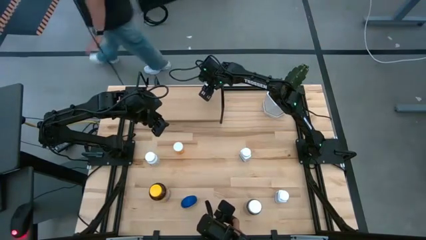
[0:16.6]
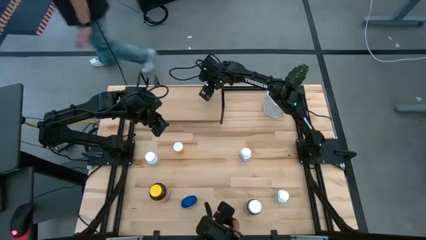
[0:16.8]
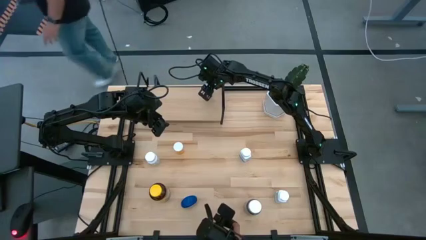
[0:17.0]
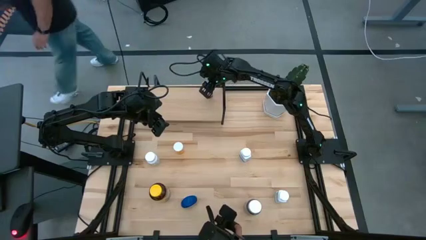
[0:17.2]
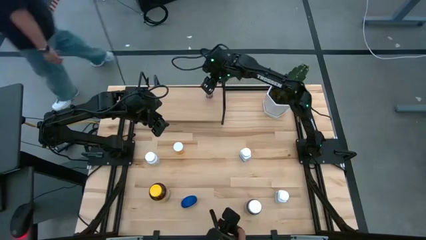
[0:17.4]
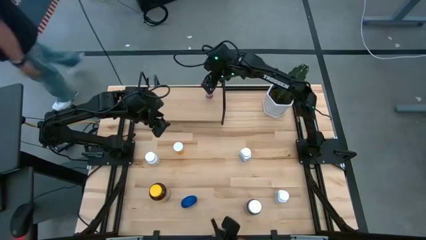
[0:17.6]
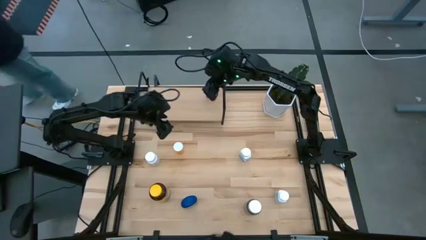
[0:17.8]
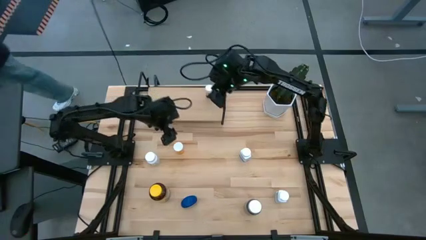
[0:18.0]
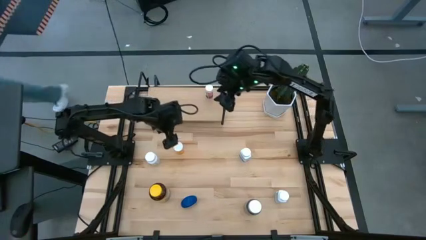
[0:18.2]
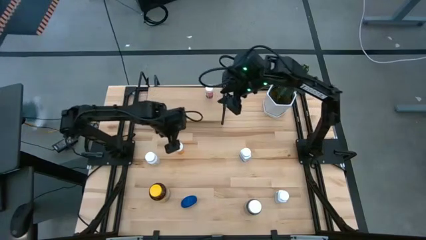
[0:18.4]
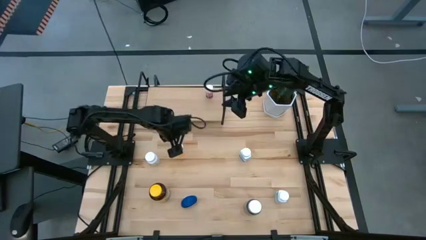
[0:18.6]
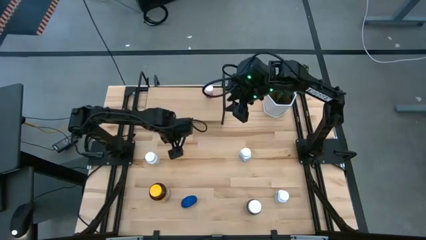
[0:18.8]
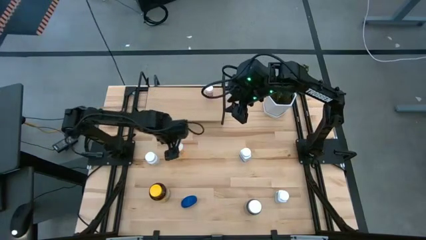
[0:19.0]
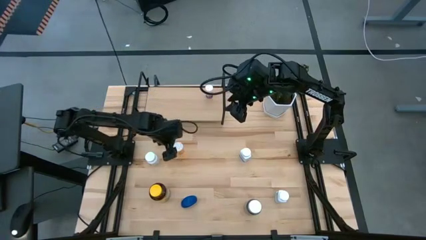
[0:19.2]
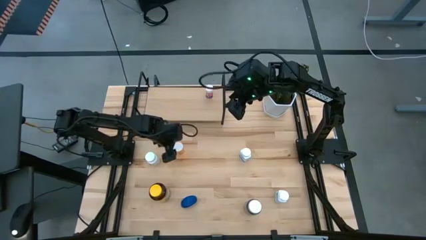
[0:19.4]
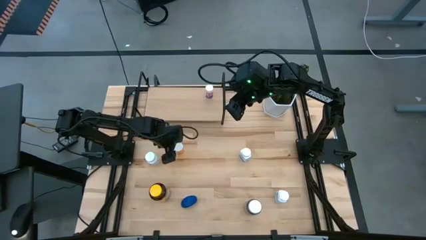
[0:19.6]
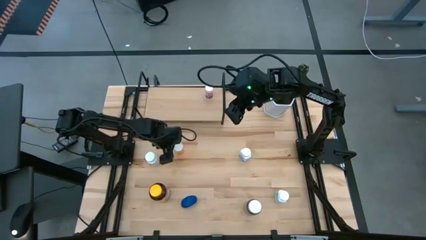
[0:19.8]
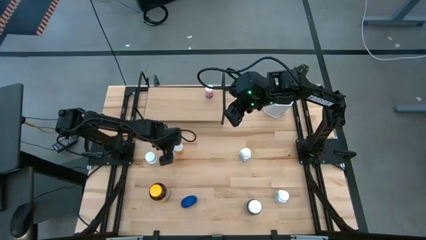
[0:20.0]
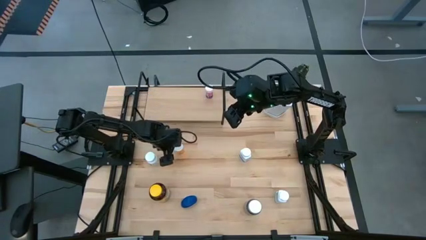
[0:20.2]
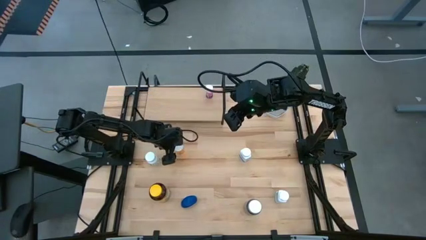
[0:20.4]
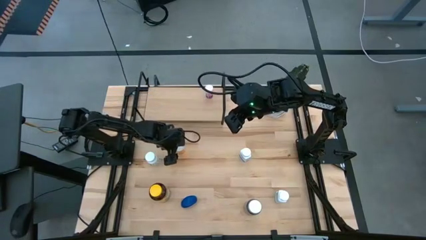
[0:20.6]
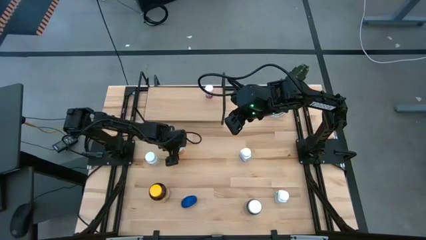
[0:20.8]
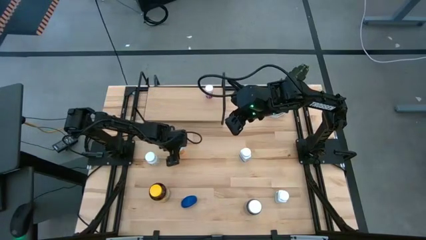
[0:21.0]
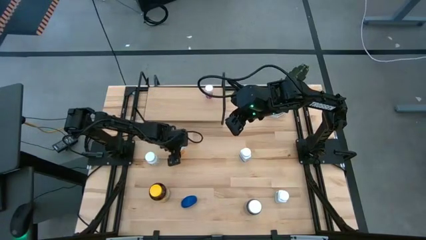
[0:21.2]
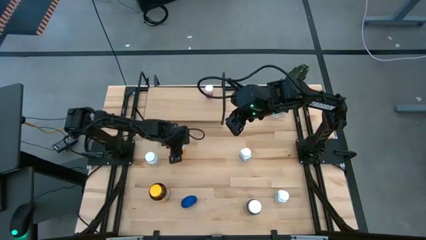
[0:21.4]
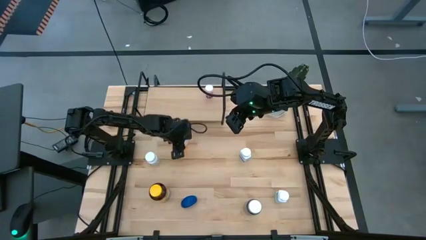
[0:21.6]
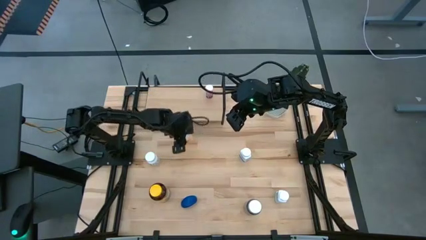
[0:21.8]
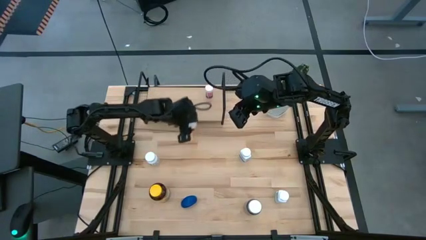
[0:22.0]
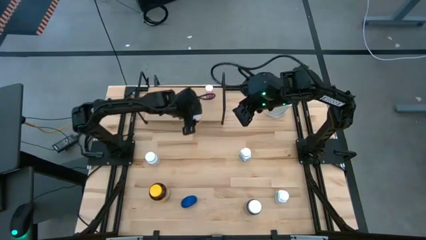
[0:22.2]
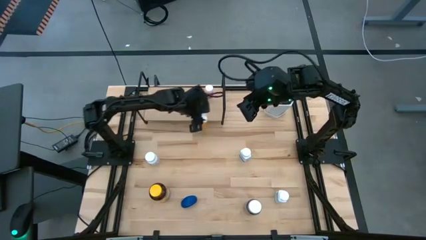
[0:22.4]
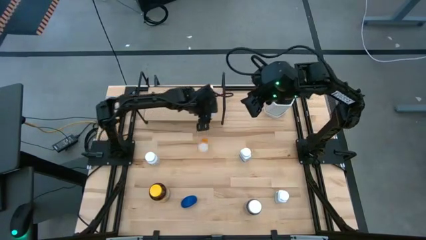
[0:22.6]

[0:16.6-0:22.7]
Task: Pick and place medicine bottles onto shelf by color
Put the orange pill bottle on the shelf

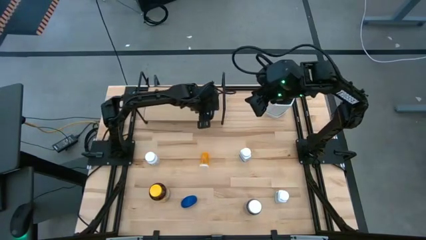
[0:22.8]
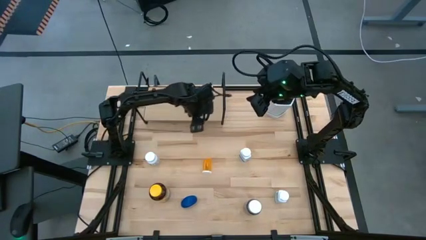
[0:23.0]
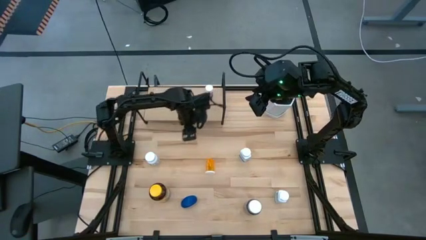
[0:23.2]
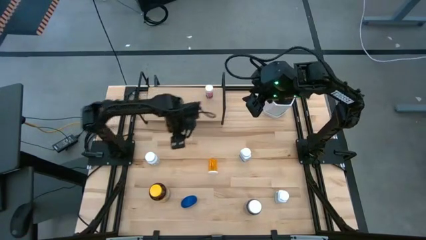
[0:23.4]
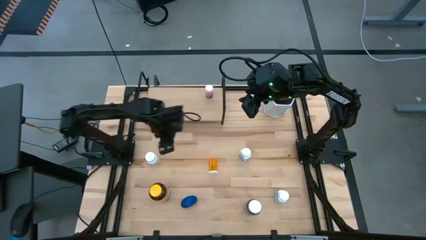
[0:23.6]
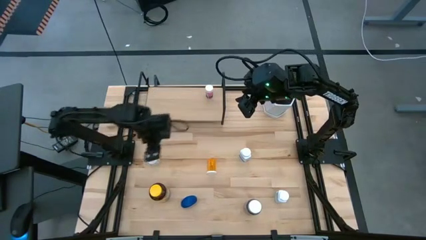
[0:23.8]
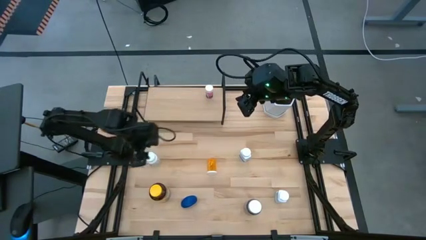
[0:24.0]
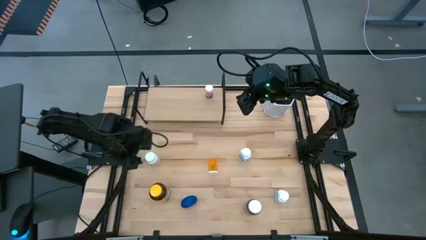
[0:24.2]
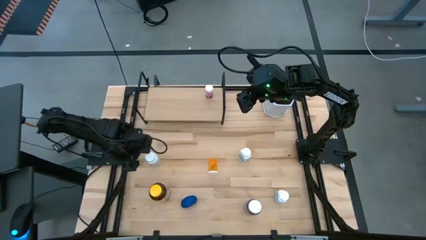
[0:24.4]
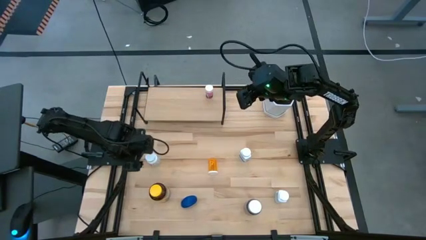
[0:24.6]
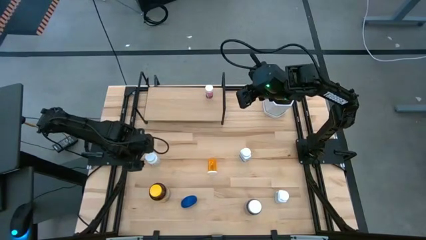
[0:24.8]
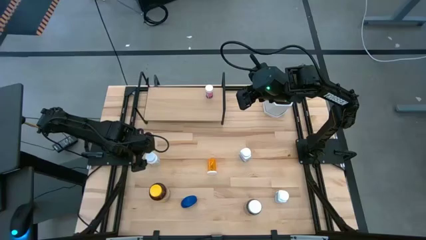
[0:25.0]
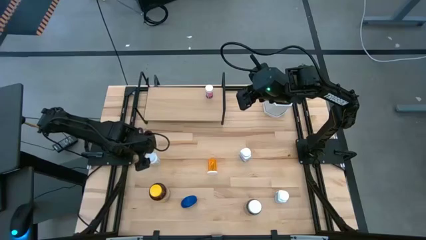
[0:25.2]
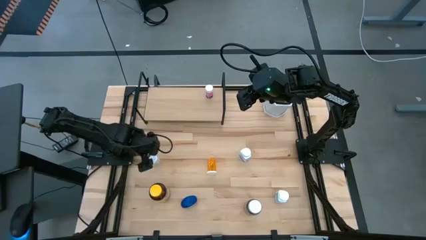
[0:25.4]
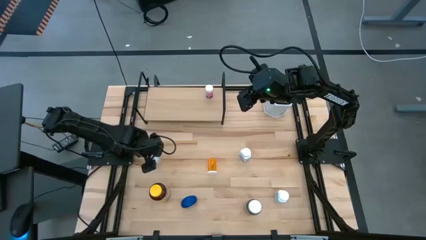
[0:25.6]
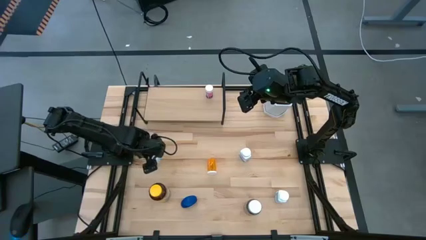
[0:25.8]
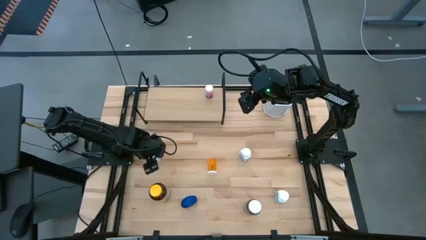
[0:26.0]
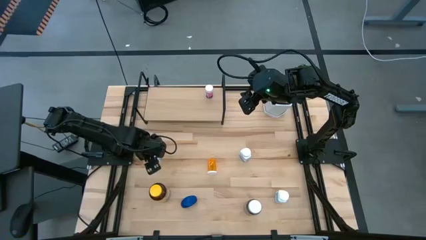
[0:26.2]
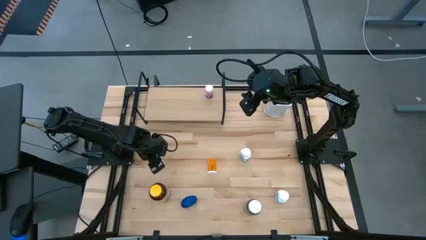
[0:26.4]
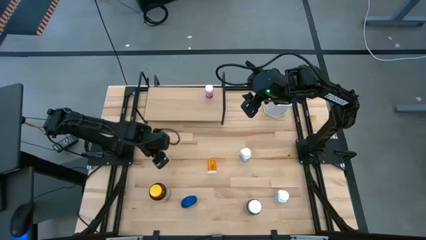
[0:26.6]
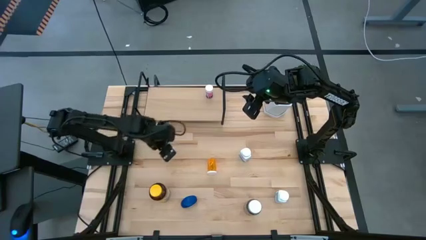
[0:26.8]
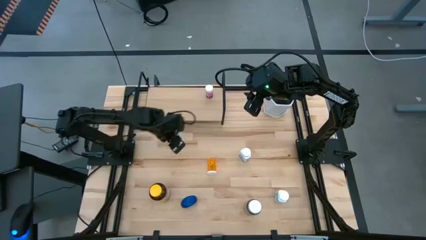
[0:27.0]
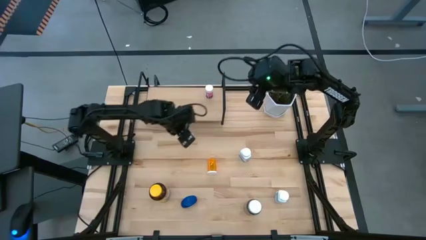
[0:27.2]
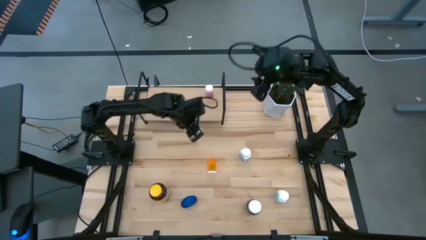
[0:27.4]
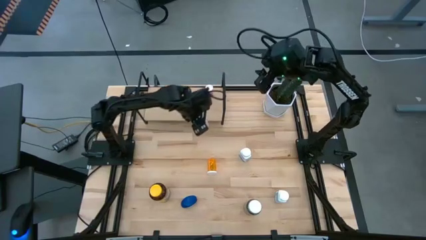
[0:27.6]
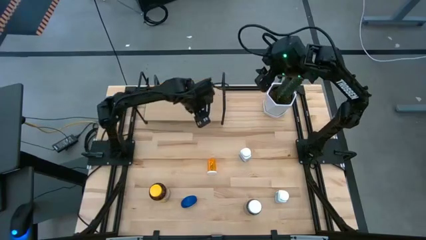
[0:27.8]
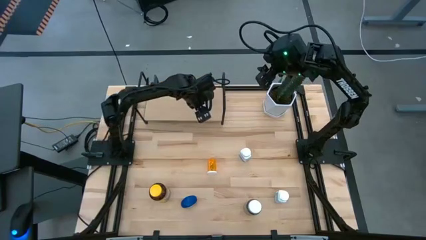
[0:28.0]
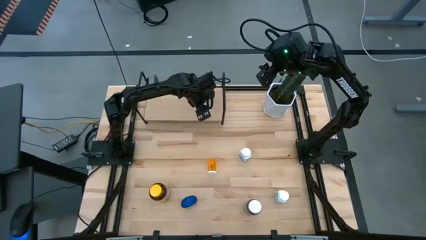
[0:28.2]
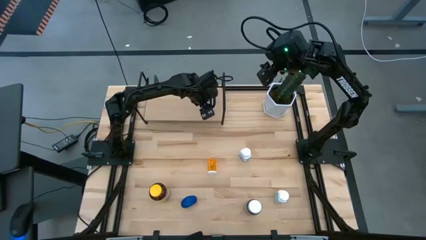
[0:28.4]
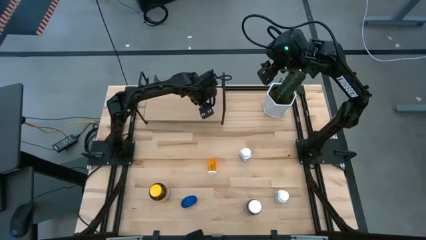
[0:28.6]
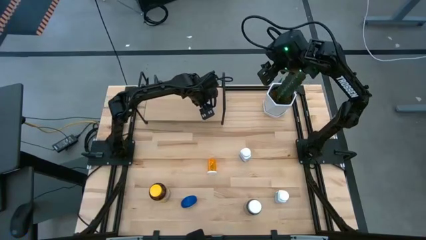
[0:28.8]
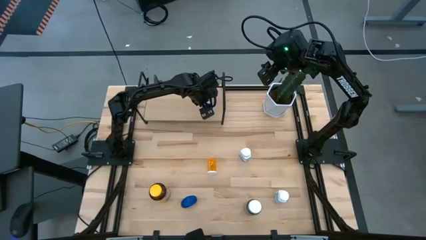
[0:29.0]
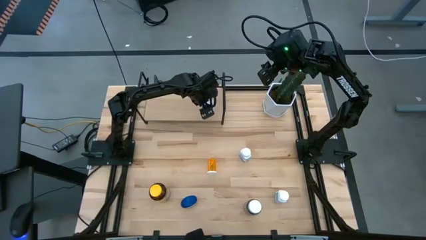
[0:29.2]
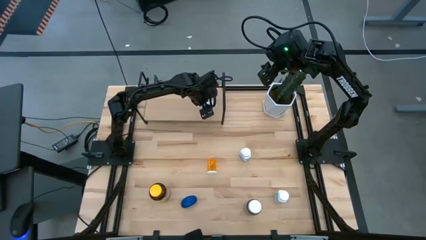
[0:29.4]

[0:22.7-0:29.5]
Put the top left white pill bottle on the shelf

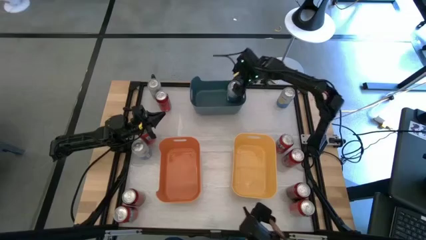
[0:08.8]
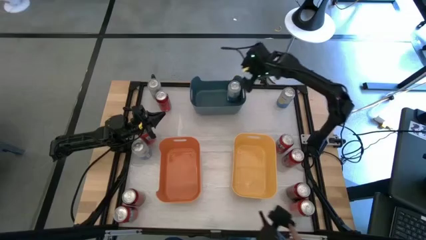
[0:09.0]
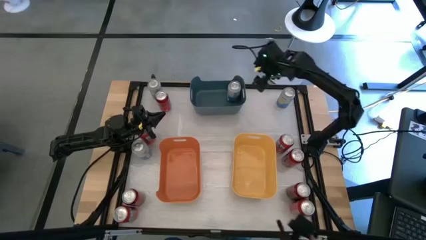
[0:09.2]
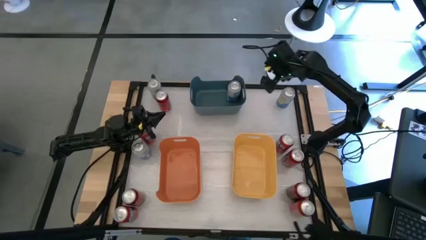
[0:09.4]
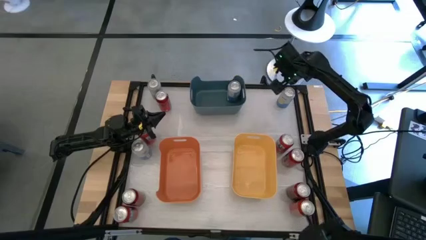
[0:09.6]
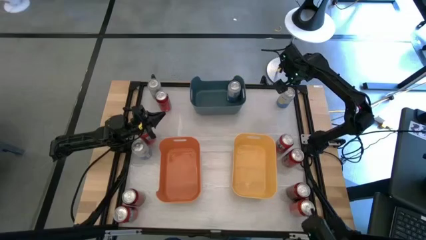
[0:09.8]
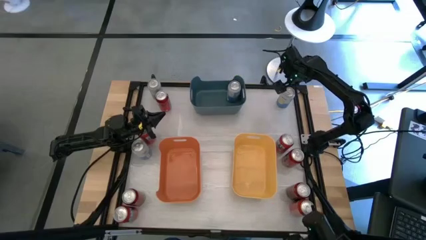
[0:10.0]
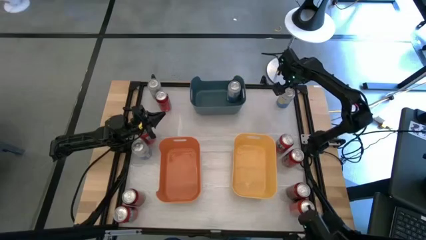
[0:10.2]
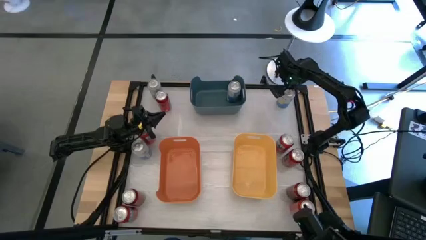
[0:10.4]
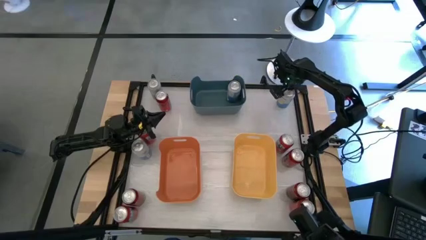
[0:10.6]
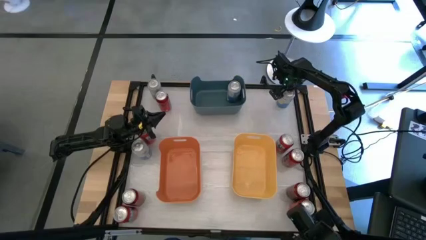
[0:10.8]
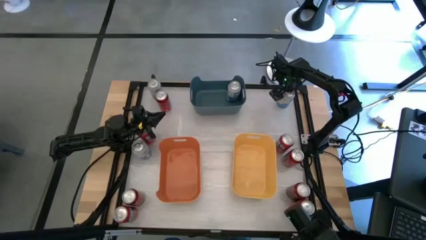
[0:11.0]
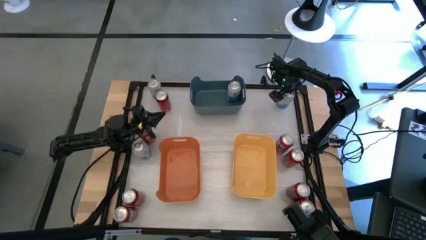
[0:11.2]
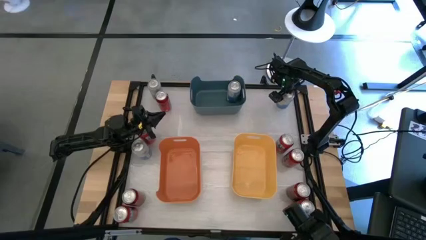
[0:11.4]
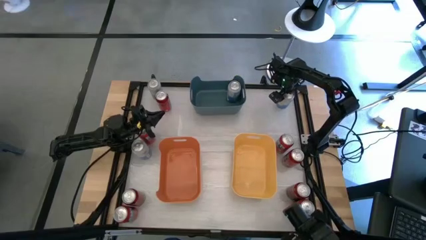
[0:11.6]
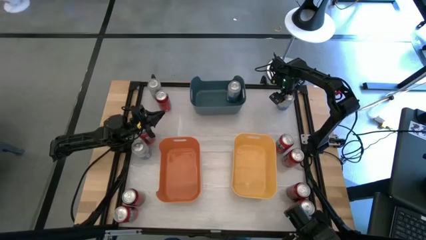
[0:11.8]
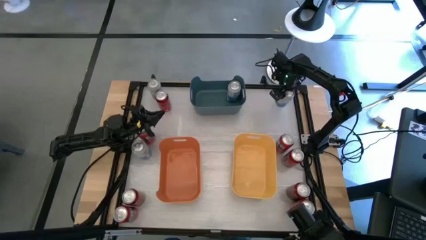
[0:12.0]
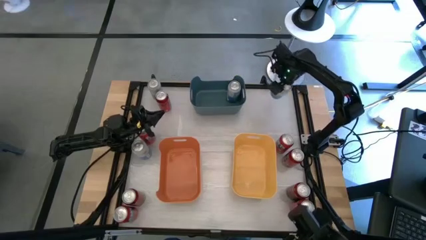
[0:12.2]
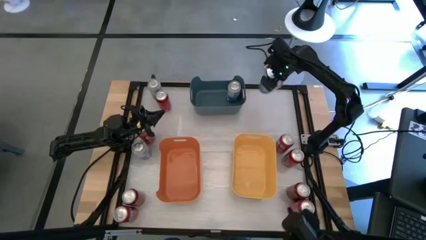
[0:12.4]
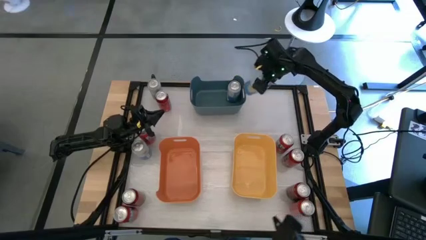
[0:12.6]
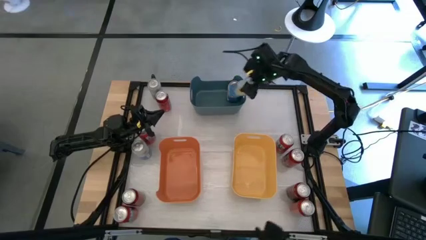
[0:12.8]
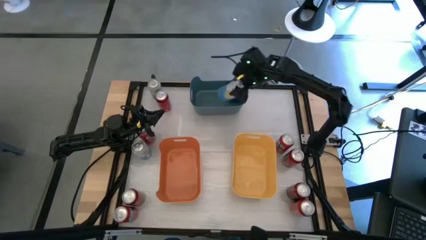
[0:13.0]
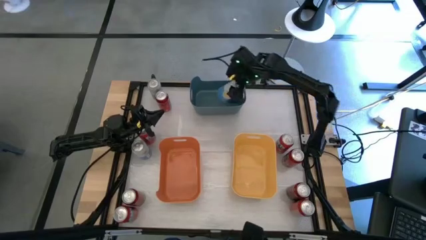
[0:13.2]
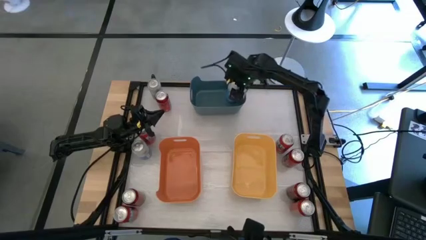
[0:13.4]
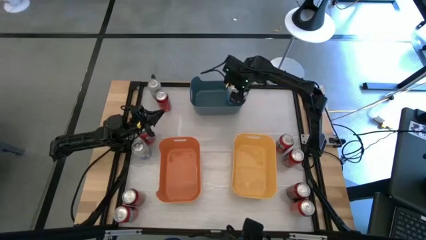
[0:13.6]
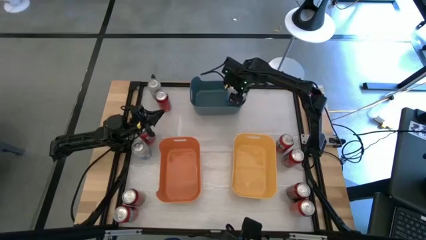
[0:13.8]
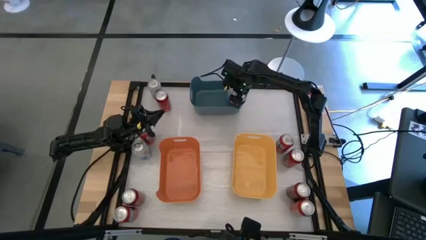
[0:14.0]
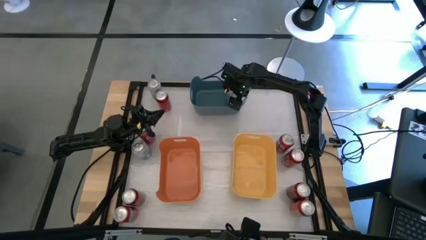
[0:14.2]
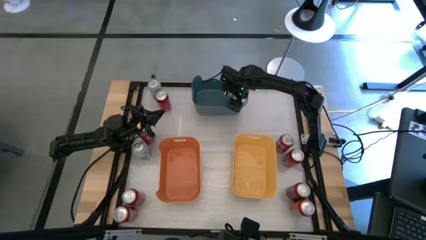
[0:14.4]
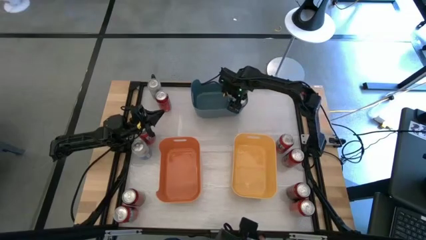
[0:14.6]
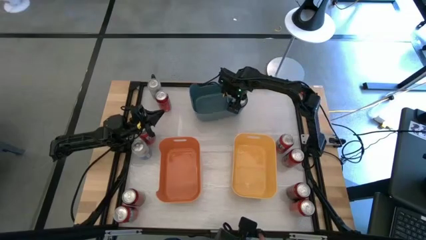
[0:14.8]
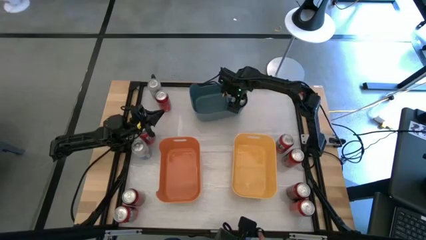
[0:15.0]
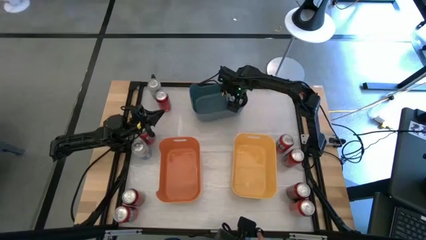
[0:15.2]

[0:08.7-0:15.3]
Task: Sort soda cans
Put the top right blue-white soda can into the green bin
